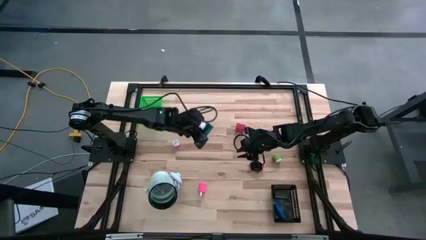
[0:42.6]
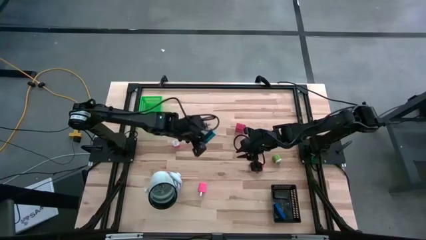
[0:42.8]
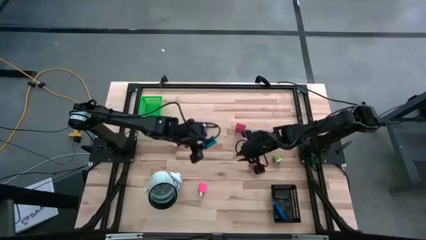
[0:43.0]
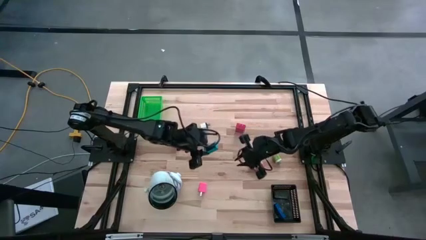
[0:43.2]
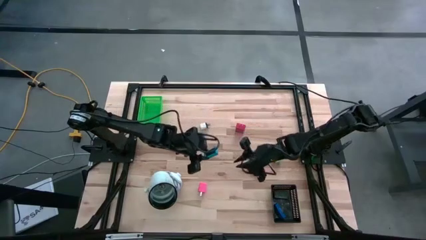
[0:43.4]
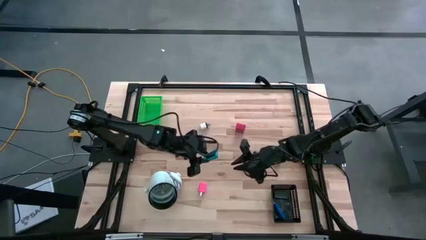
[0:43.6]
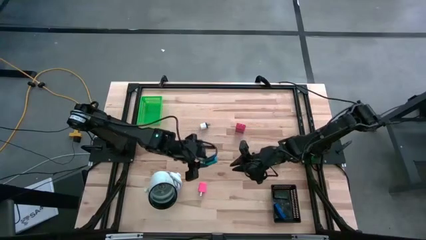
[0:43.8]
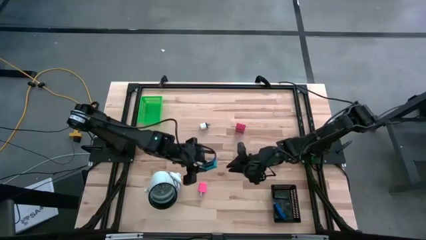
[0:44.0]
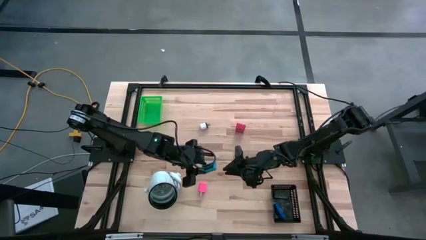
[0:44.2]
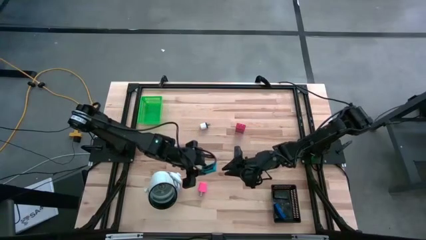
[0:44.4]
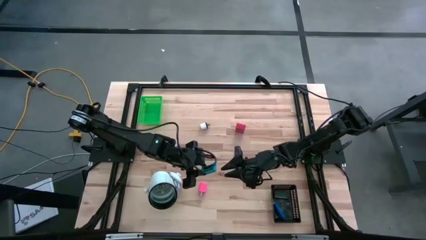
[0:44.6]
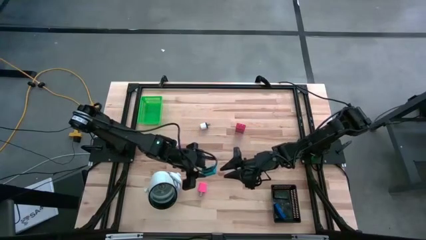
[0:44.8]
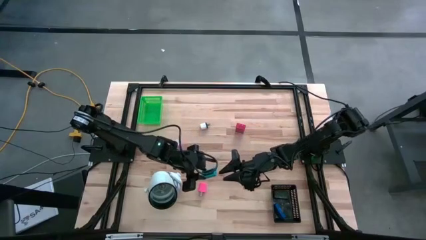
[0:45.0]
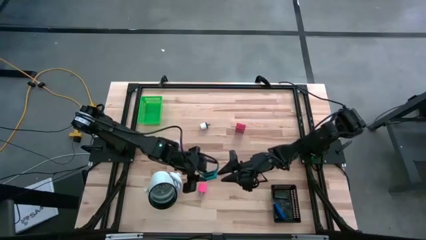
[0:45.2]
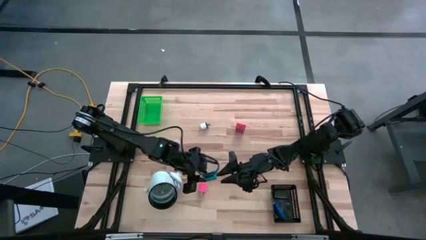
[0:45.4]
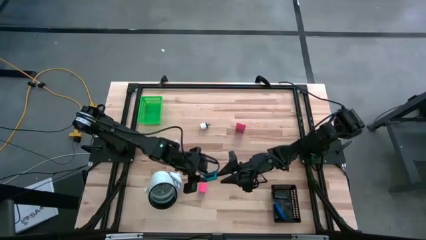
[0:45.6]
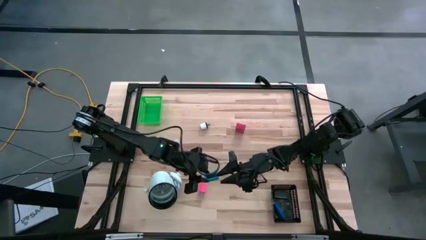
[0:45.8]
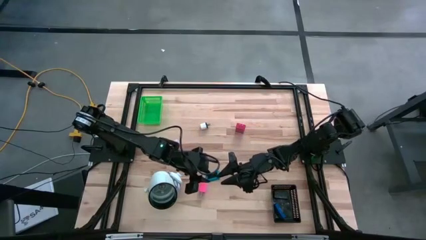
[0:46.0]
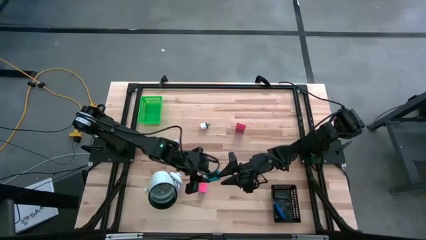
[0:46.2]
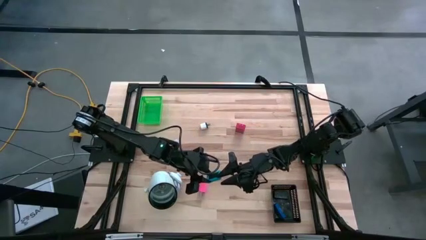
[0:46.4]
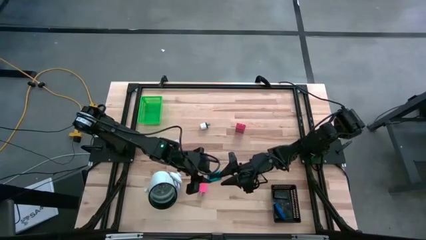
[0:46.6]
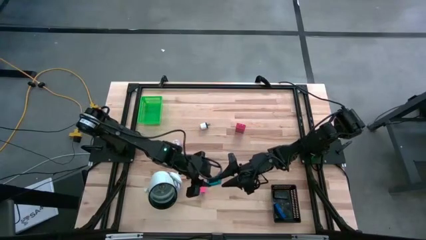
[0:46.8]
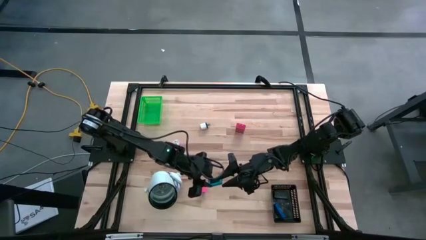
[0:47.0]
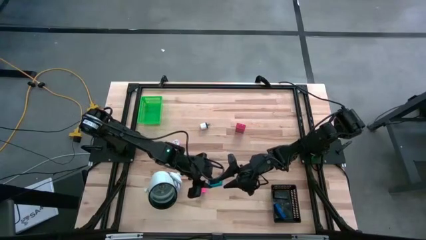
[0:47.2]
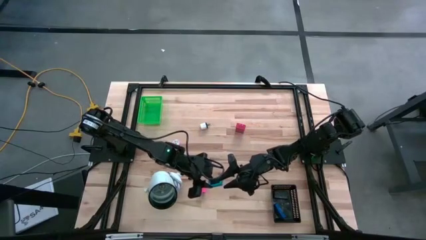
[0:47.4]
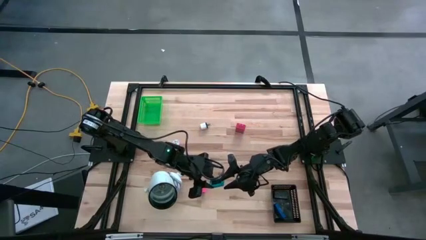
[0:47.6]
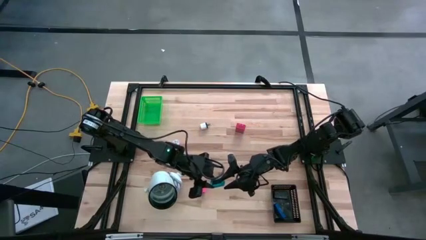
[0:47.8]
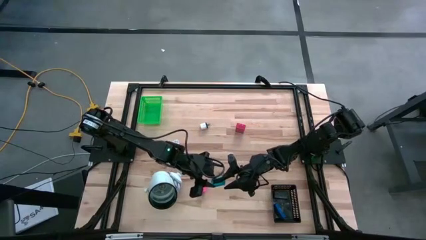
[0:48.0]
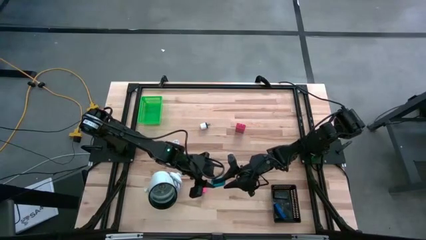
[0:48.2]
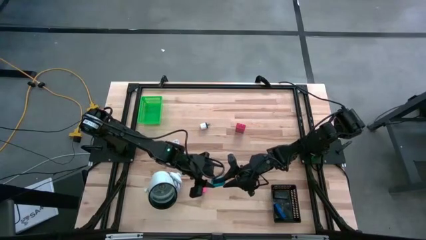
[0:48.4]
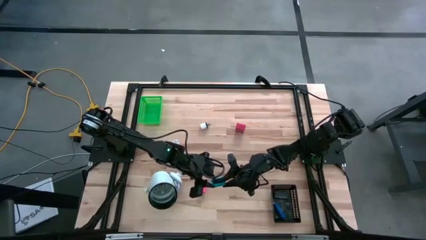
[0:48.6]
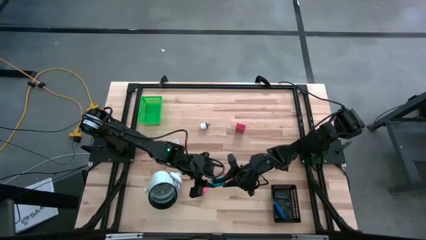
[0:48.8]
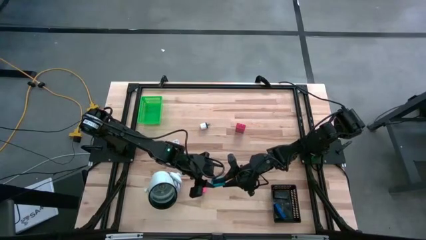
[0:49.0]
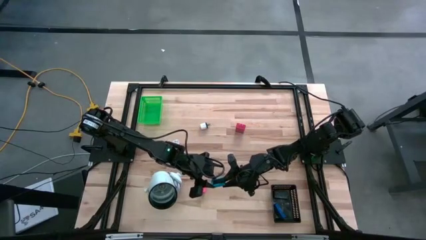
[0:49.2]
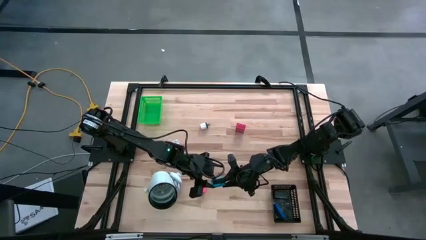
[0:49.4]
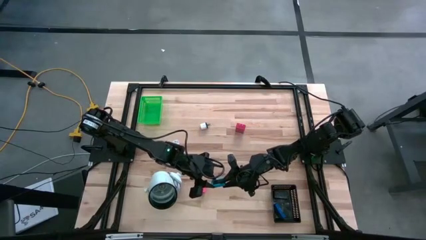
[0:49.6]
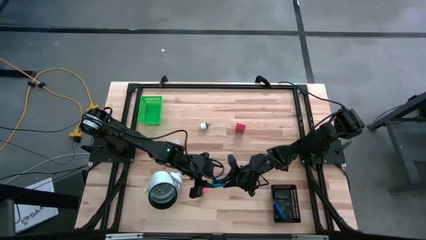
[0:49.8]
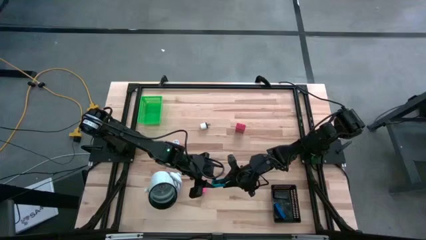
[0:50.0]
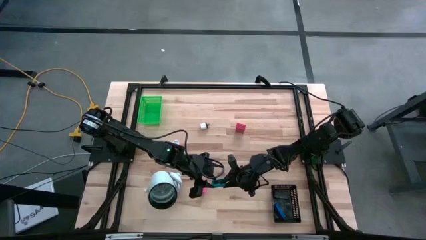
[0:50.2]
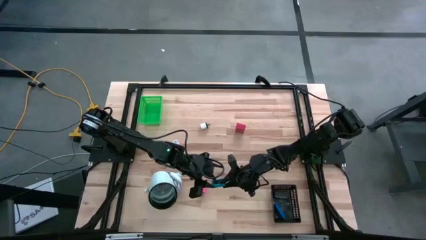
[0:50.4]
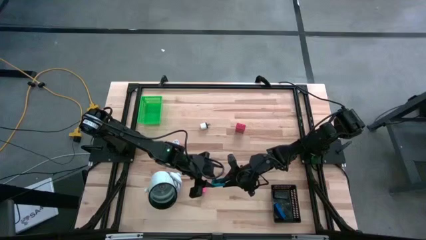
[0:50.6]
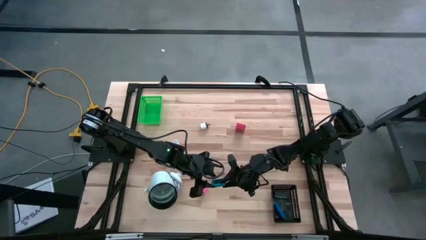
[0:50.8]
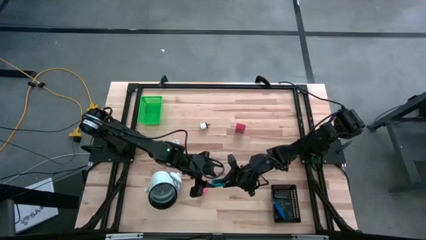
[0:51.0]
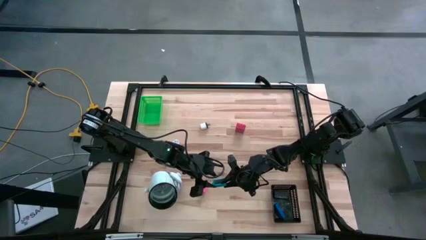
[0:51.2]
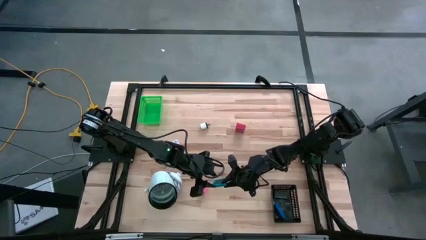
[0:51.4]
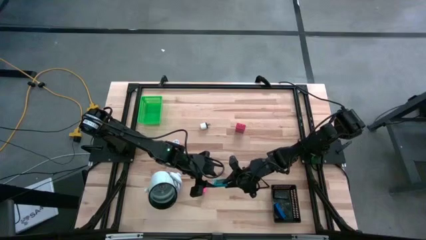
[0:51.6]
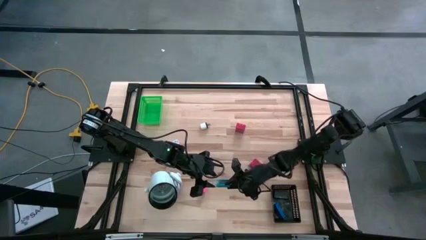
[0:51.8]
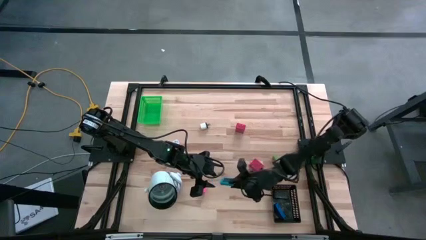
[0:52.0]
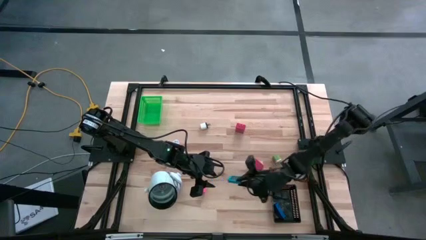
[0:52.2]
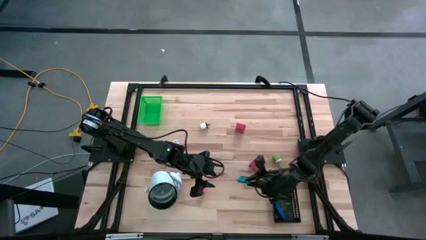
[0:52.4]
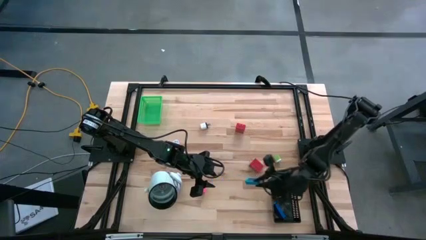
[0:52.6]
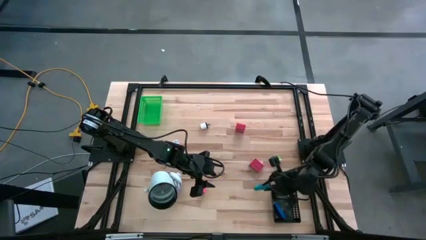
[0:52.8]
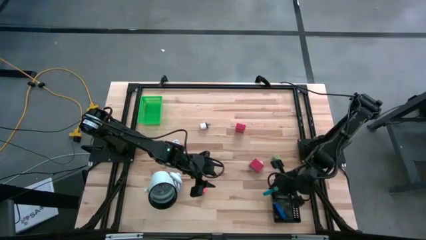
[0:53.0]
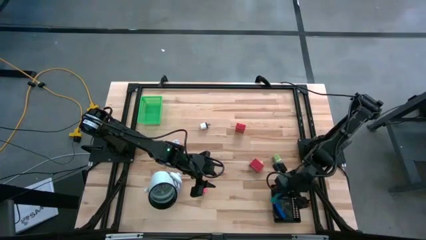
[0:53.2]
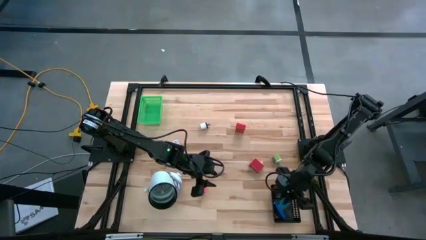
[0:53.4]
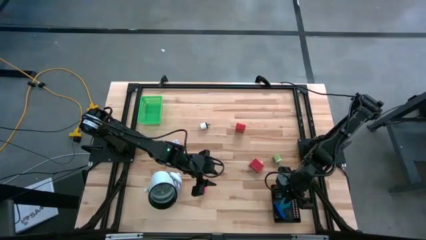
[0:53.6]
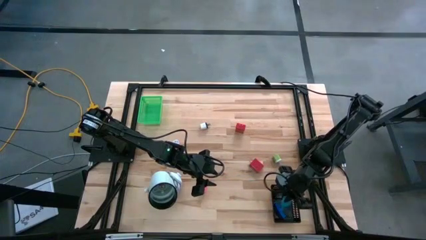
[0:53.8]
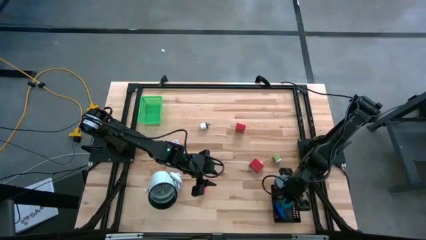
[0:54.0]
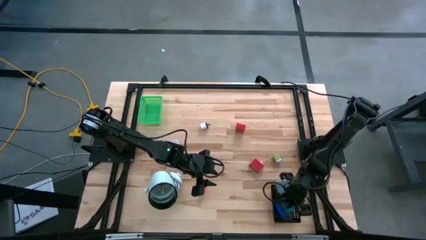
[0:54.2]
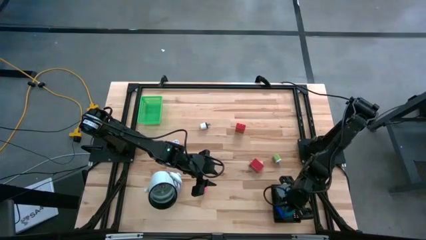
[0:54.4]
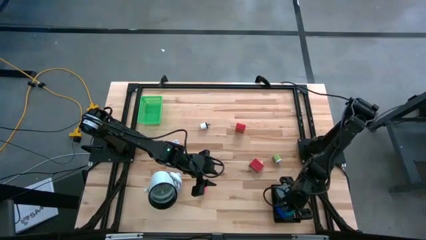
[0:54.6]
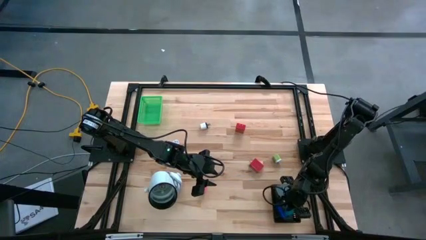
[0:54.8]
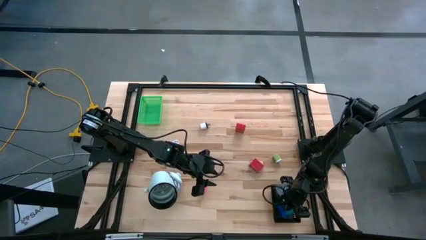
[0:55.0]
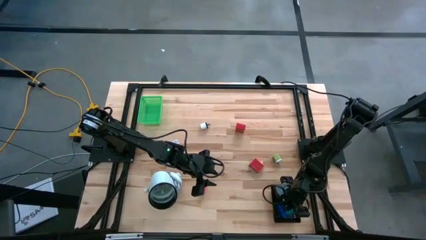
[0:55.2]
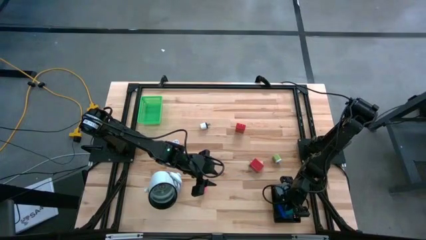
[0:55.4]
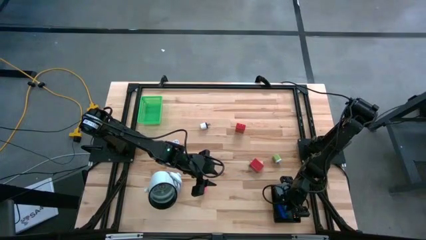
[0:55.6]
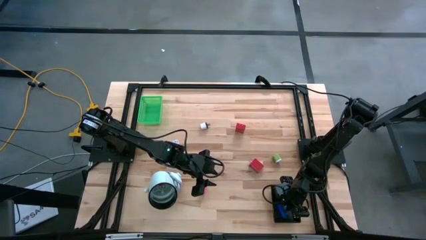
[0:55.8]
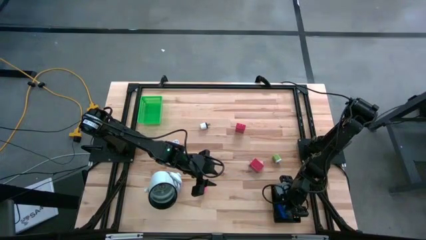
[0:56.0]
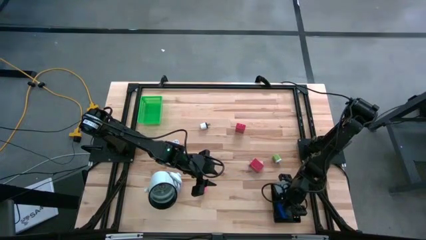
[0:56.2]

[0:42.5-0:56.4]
Task: Pick & Place Office items
Put the light blue digital clock into the black bin
